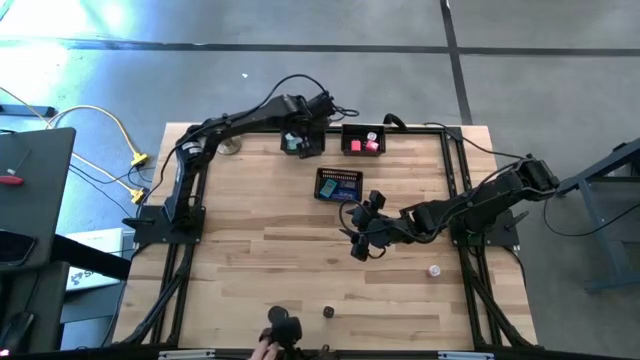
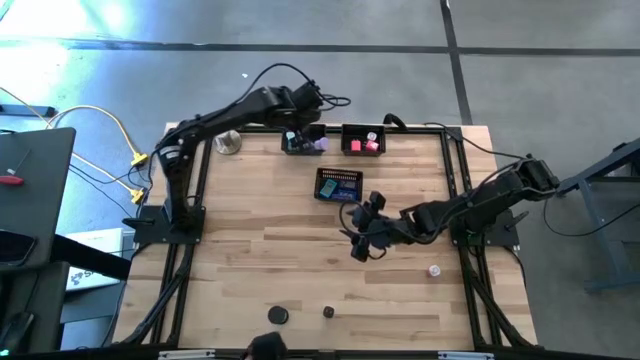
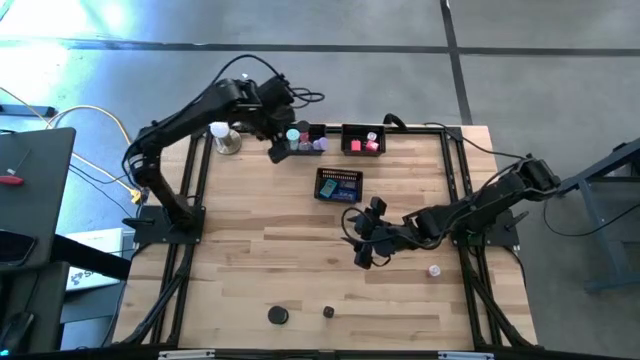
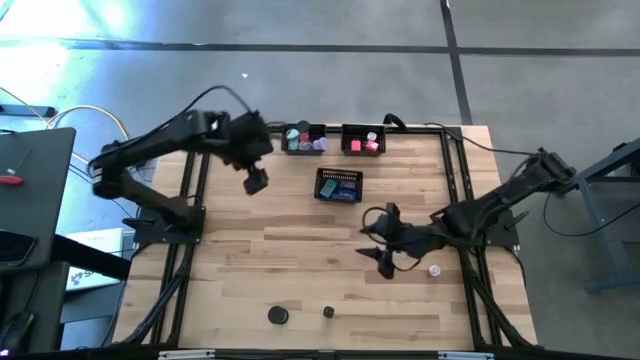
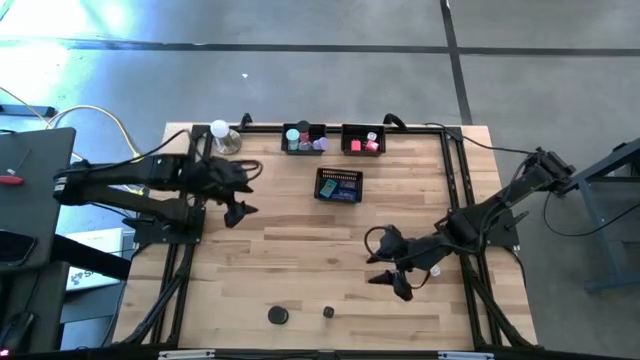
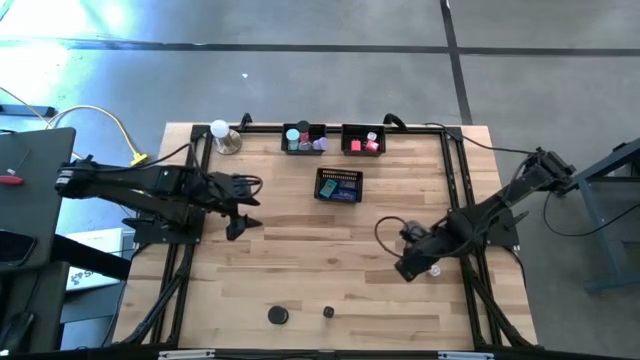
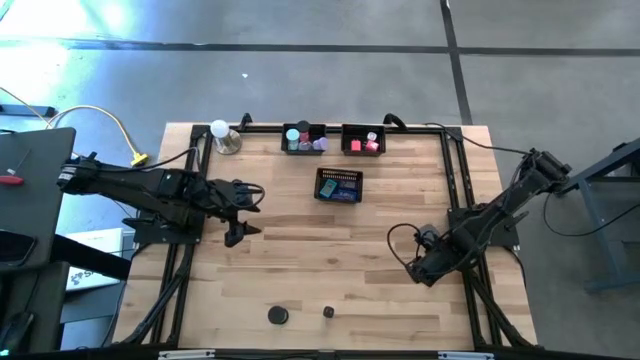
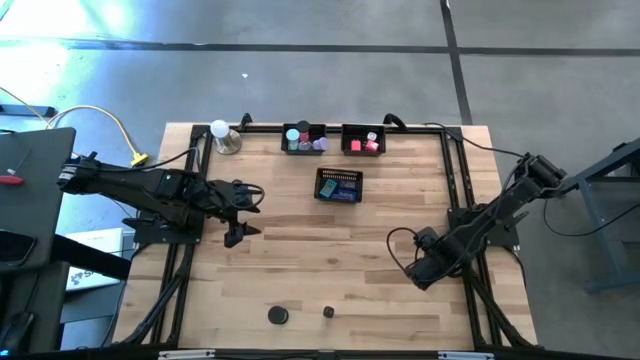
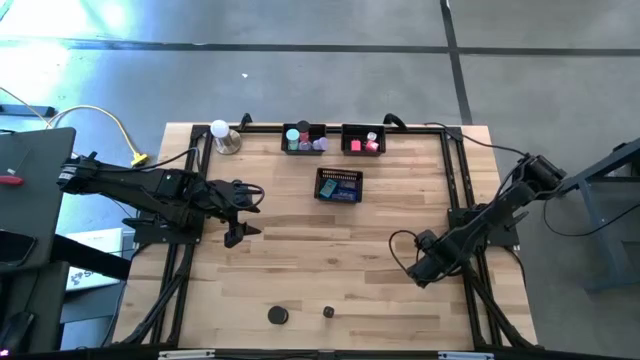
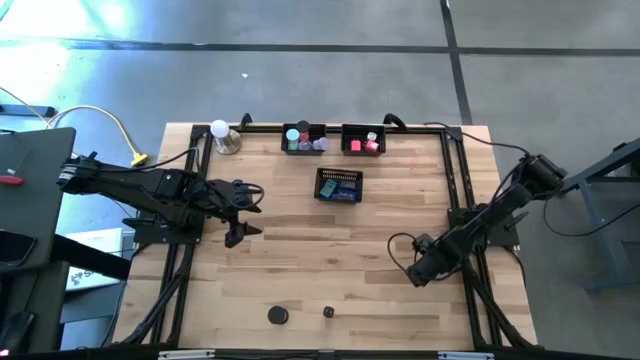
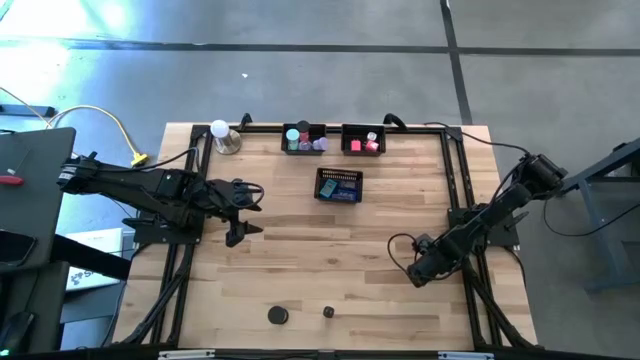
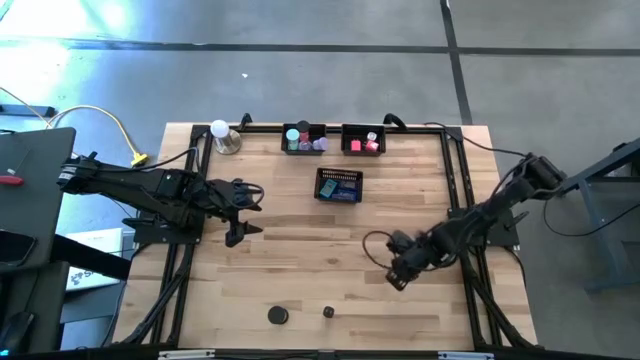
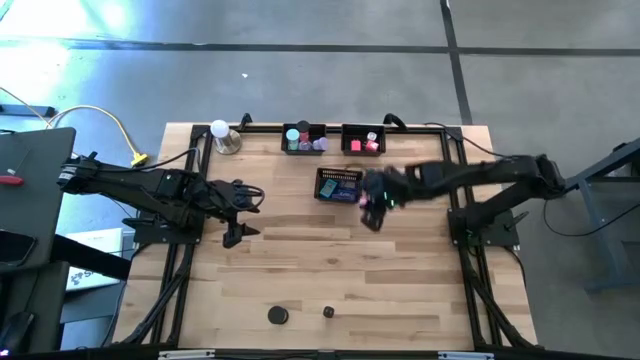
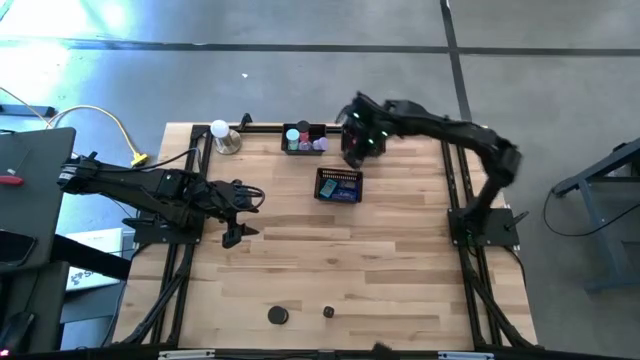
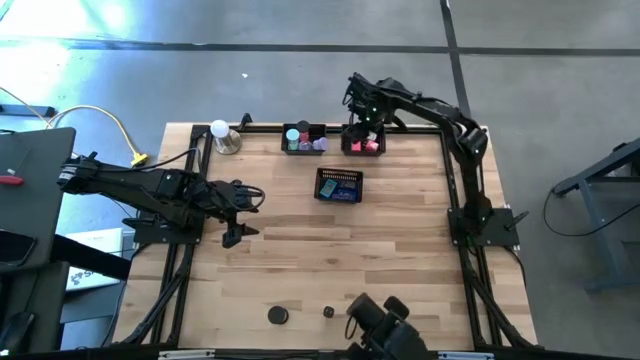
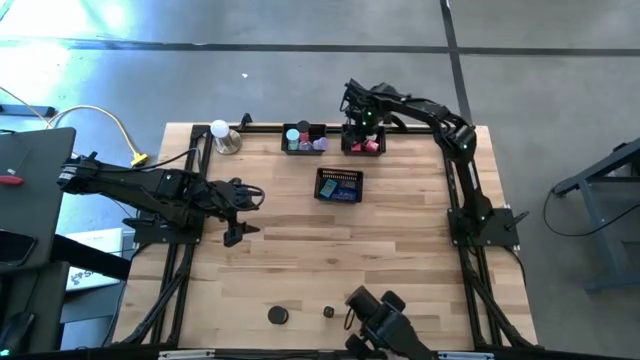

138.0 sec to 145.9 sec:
Task: Pick & Place Office items
Put the pink white adapter into the top right black bin

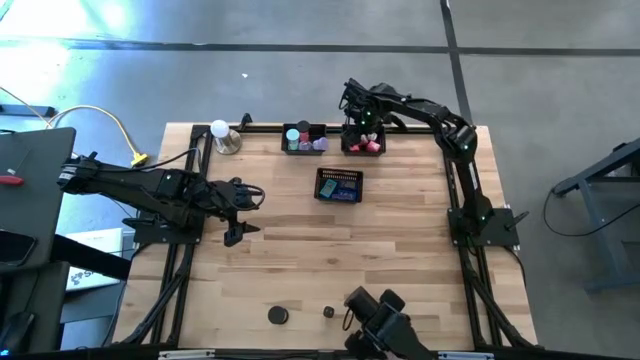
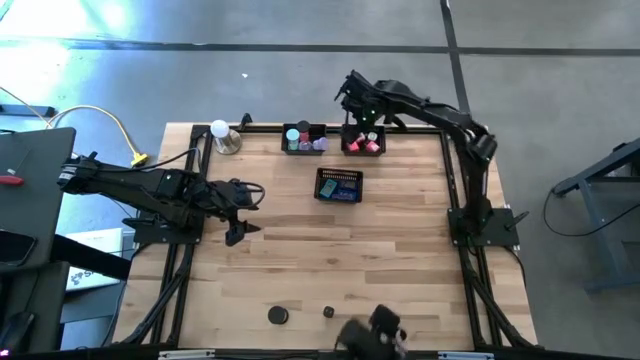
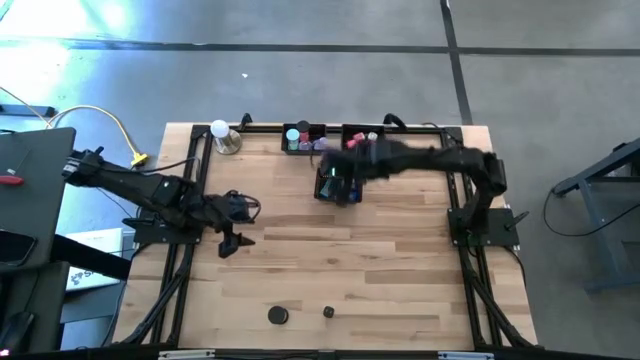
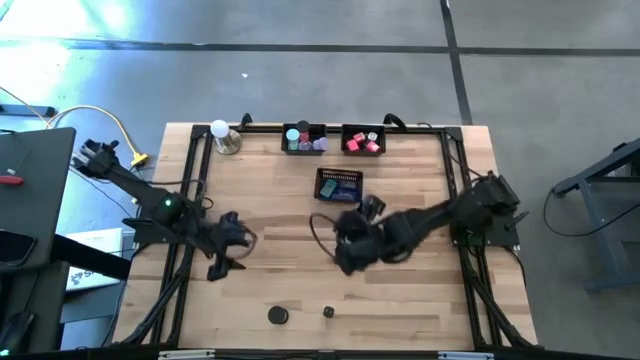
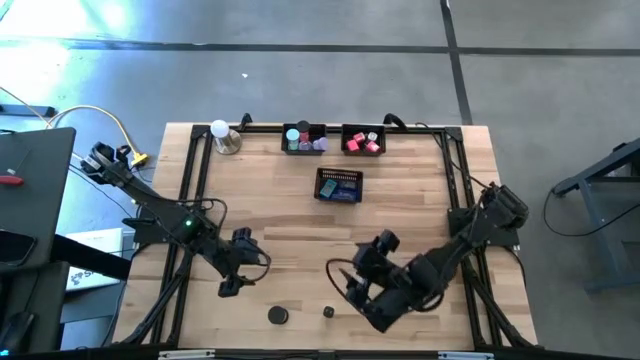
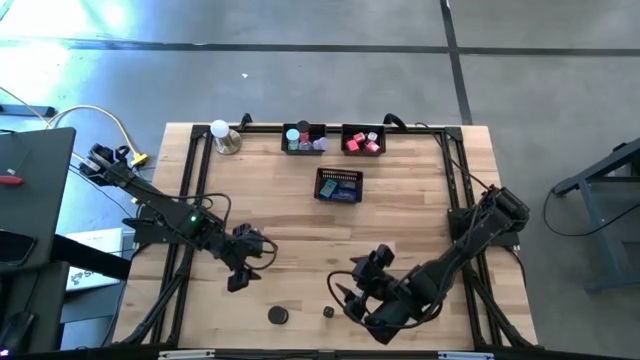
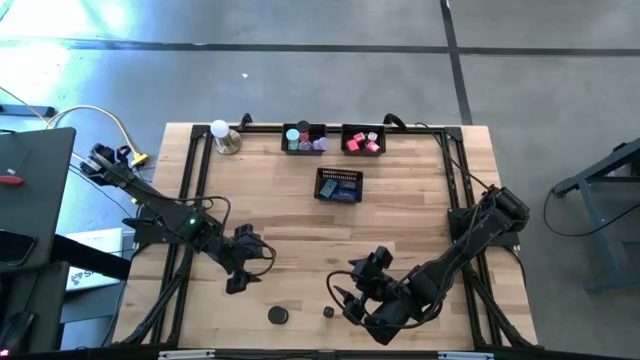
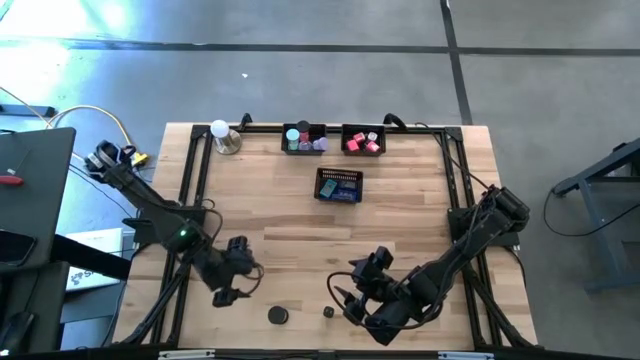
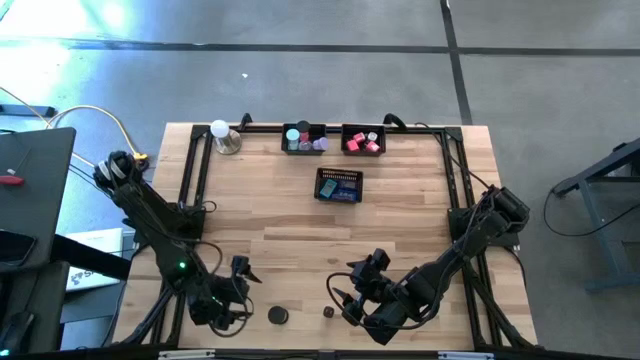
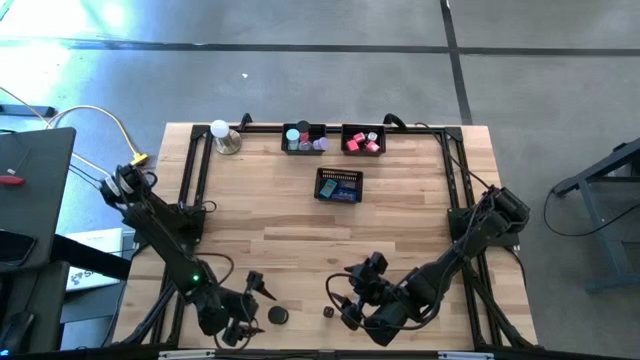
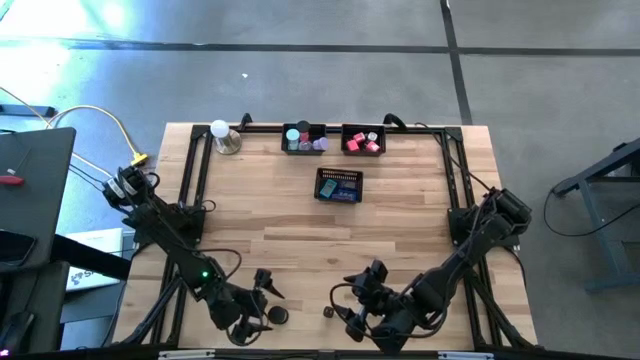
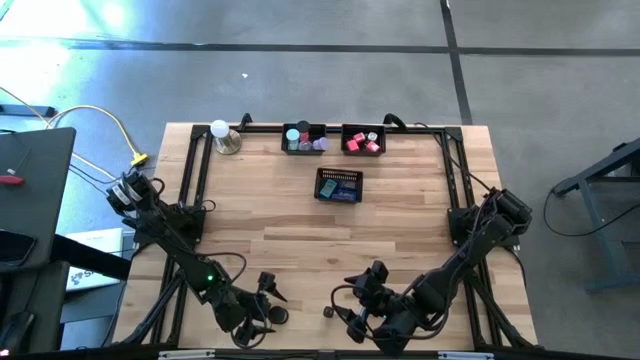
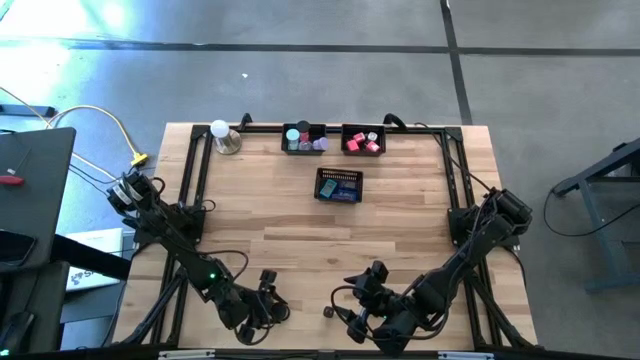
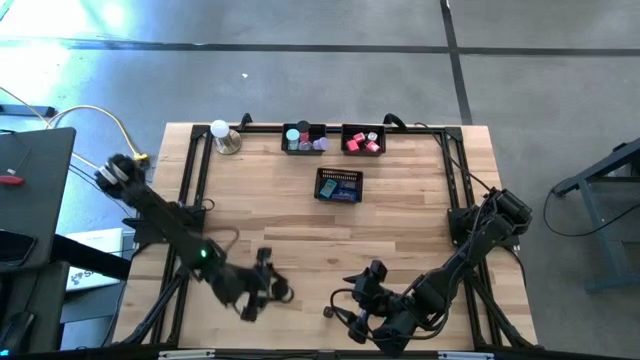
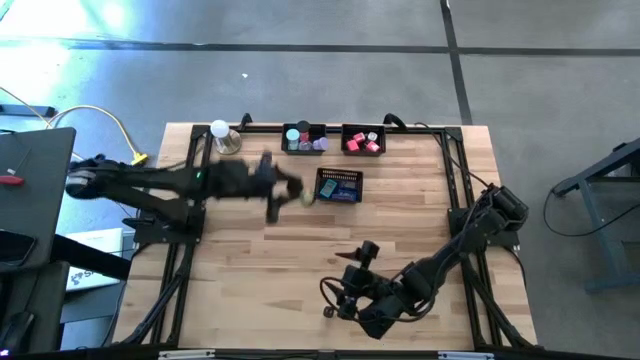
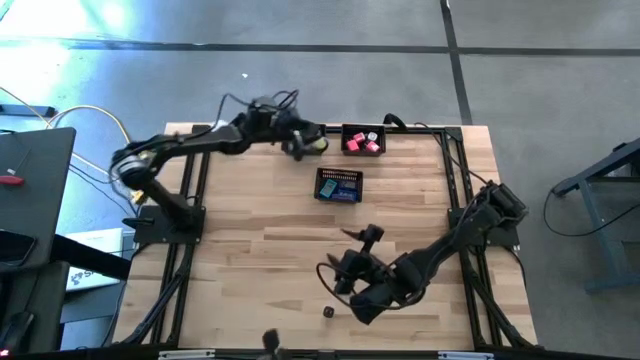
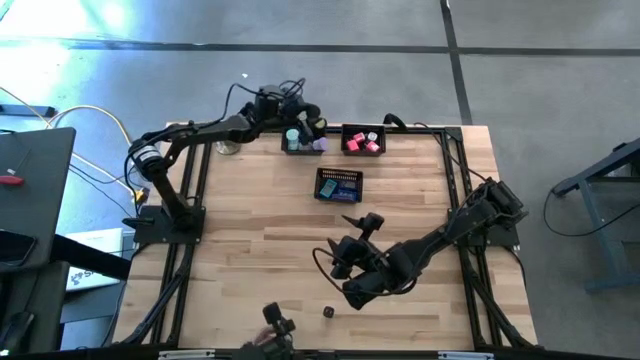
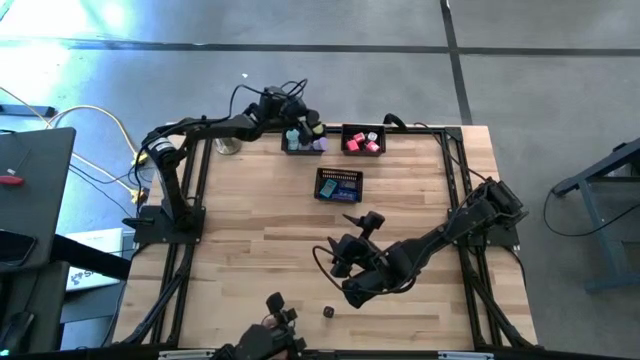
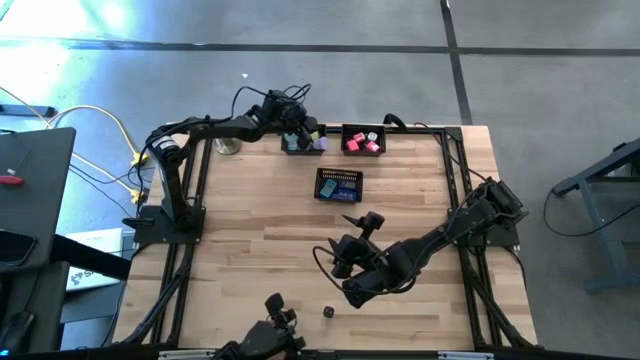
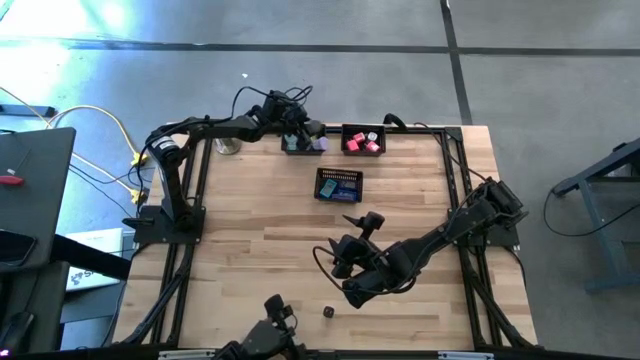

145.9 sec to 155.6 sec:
Put the green hourglass into the top left black bin
